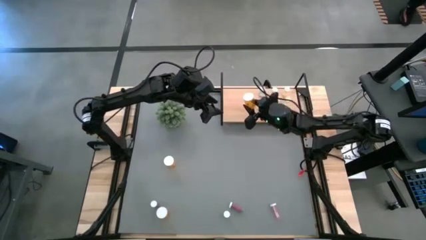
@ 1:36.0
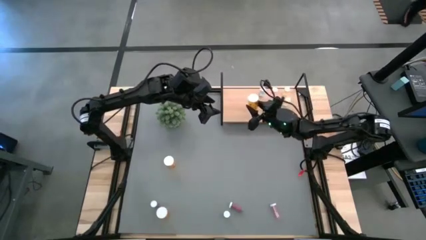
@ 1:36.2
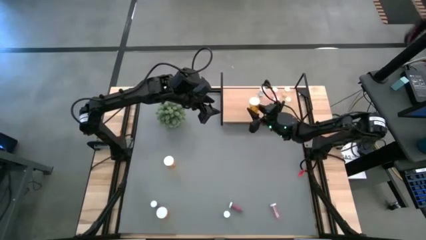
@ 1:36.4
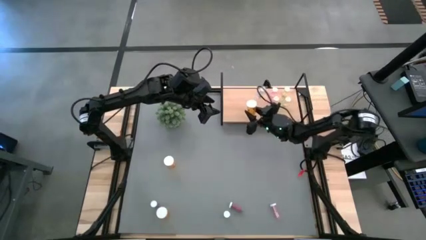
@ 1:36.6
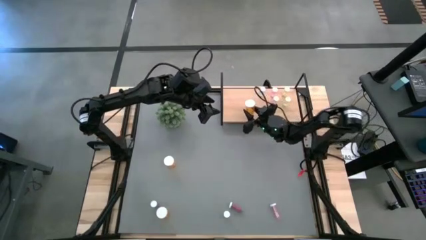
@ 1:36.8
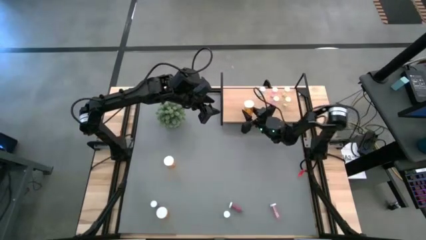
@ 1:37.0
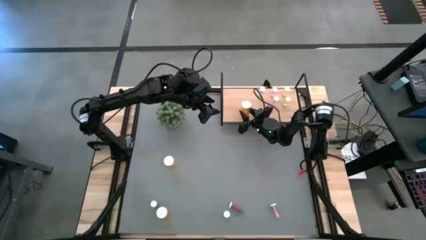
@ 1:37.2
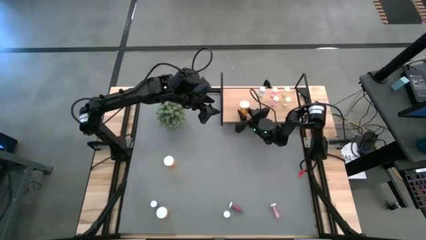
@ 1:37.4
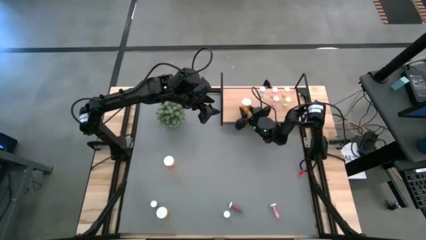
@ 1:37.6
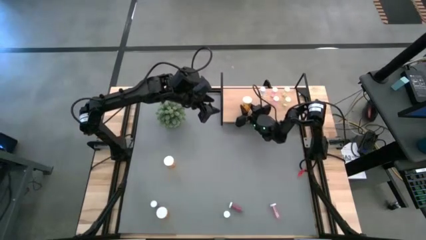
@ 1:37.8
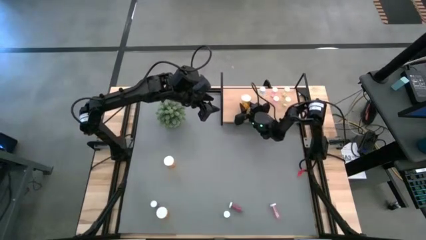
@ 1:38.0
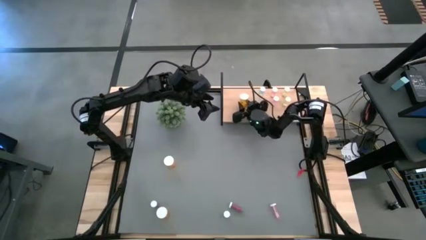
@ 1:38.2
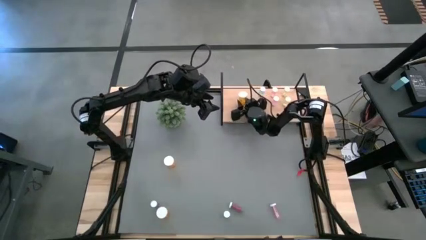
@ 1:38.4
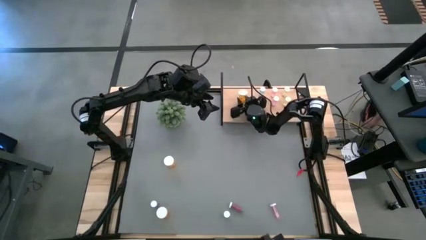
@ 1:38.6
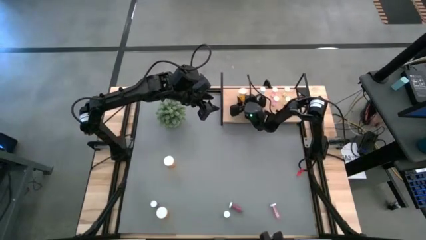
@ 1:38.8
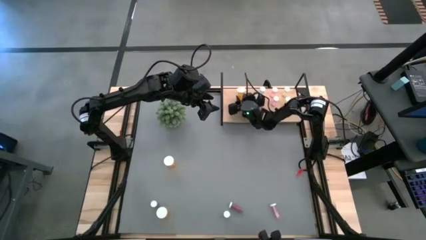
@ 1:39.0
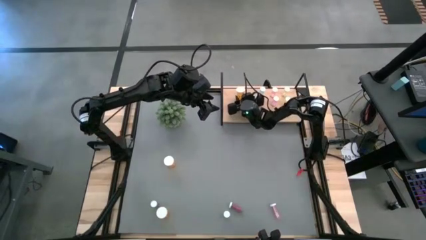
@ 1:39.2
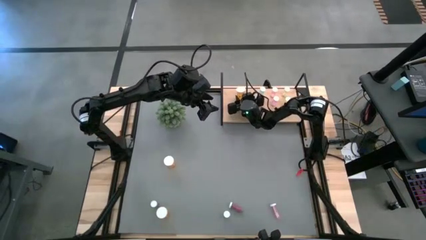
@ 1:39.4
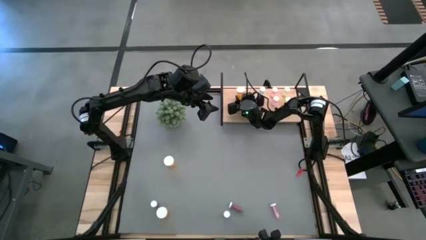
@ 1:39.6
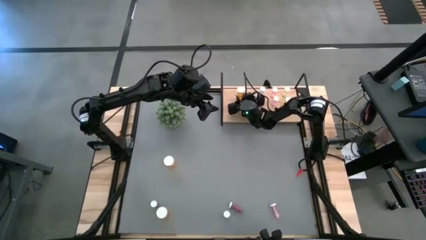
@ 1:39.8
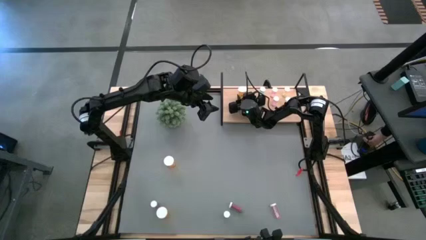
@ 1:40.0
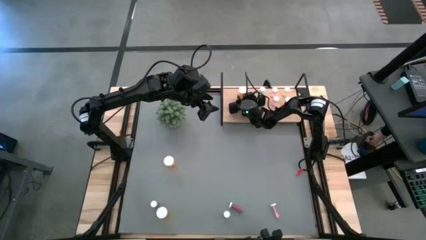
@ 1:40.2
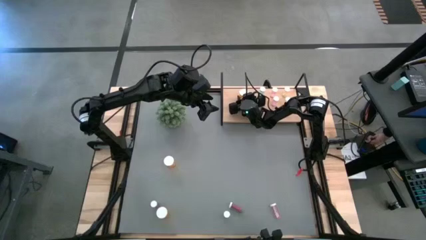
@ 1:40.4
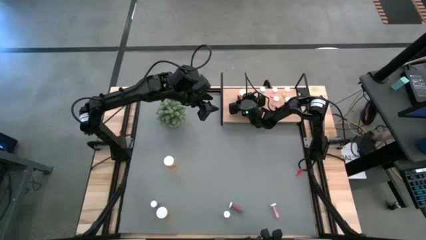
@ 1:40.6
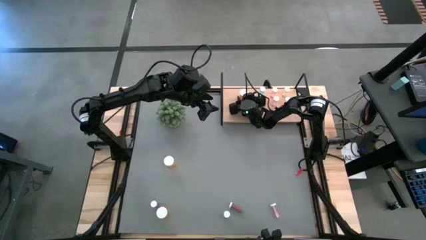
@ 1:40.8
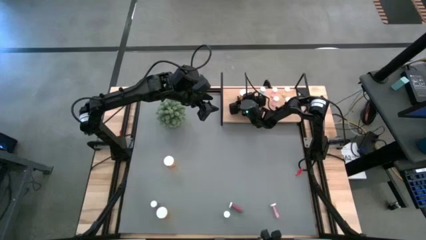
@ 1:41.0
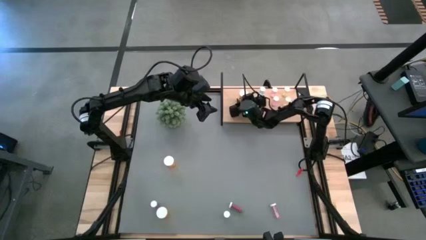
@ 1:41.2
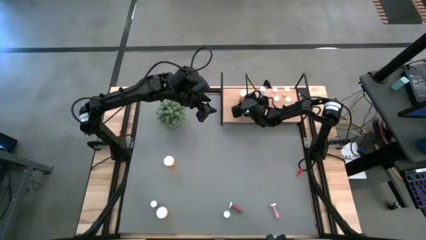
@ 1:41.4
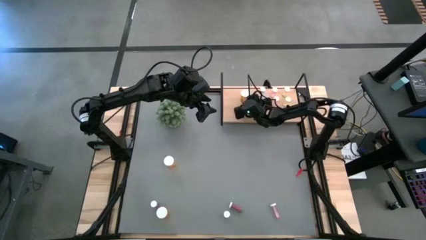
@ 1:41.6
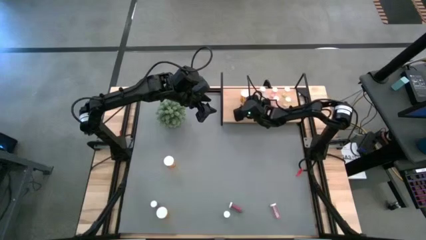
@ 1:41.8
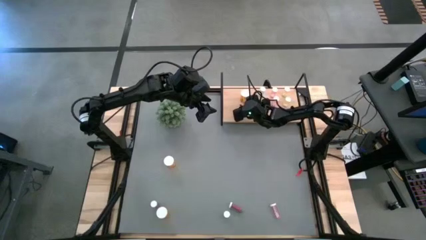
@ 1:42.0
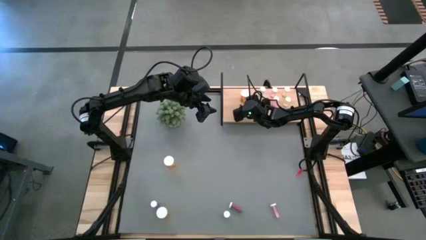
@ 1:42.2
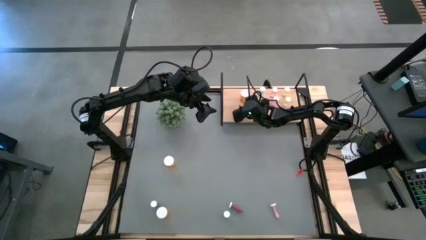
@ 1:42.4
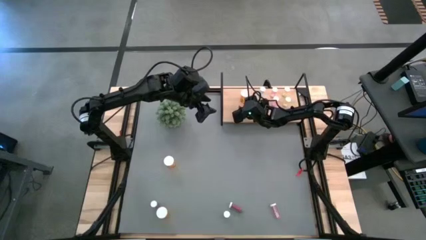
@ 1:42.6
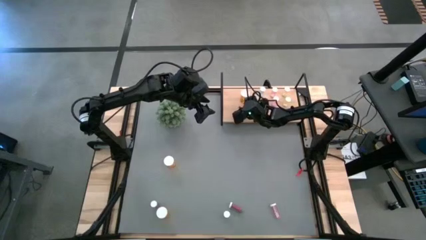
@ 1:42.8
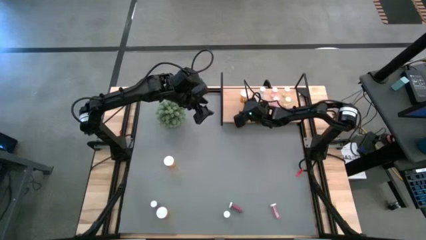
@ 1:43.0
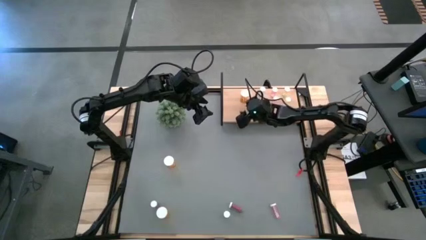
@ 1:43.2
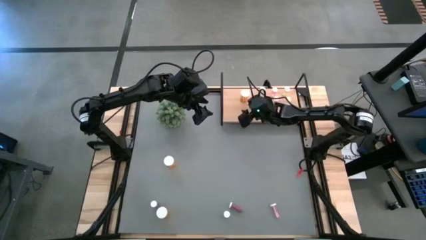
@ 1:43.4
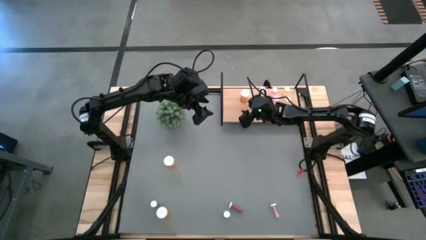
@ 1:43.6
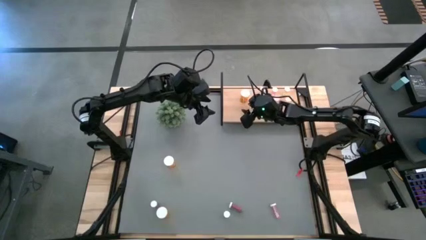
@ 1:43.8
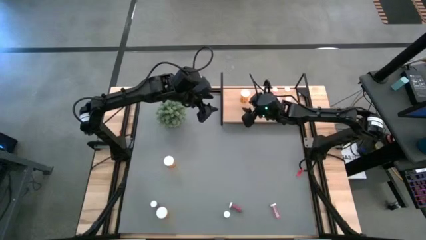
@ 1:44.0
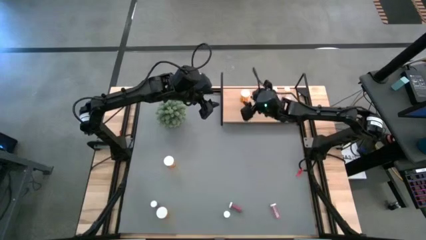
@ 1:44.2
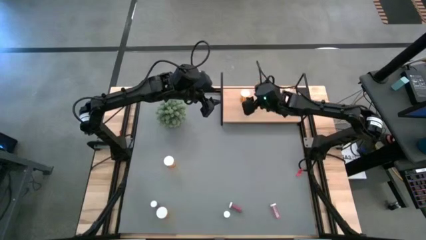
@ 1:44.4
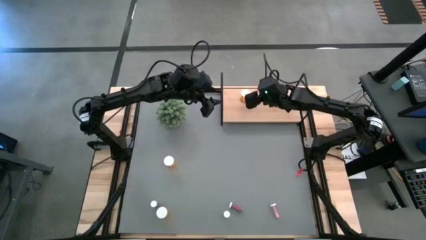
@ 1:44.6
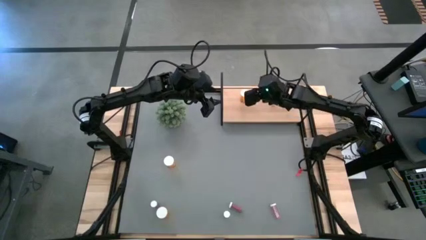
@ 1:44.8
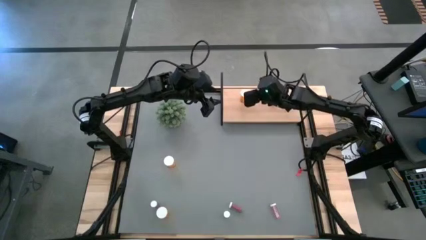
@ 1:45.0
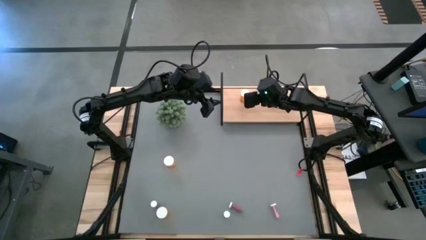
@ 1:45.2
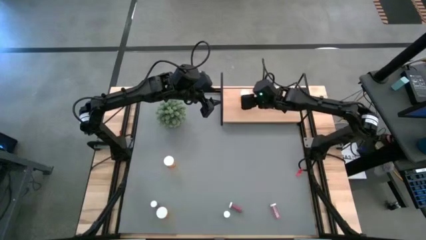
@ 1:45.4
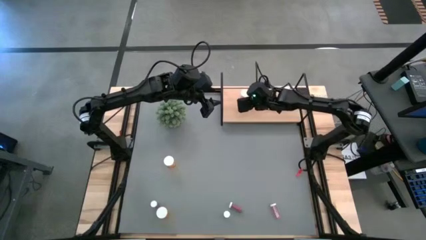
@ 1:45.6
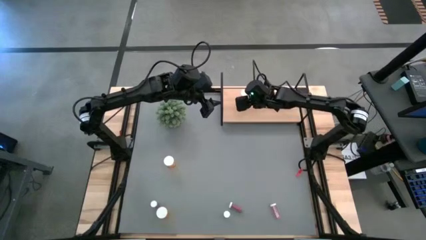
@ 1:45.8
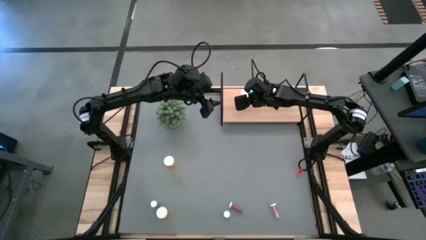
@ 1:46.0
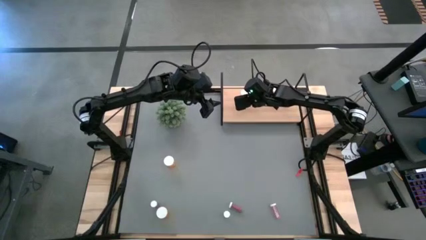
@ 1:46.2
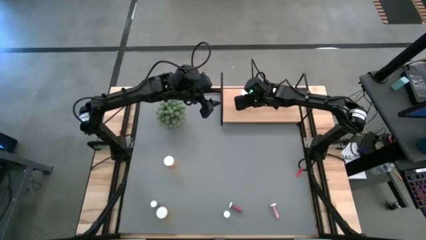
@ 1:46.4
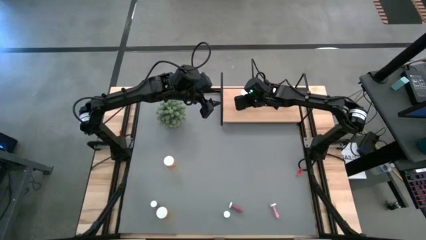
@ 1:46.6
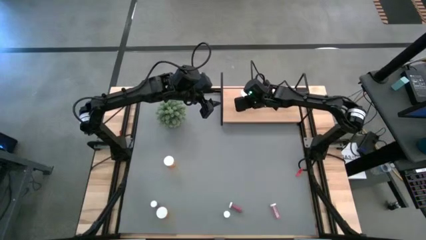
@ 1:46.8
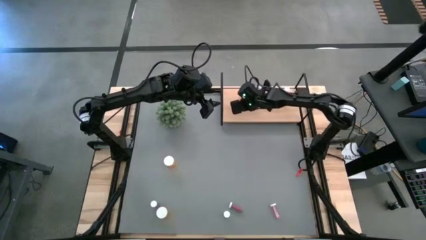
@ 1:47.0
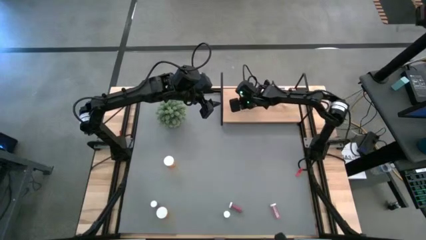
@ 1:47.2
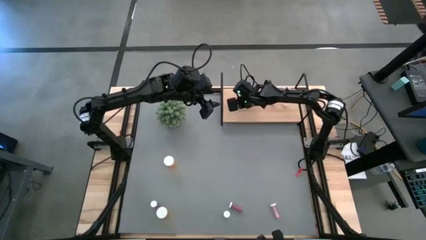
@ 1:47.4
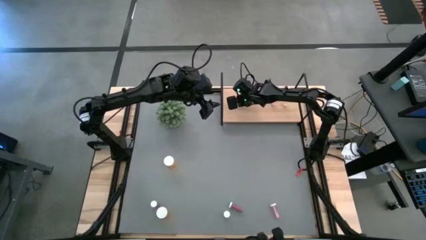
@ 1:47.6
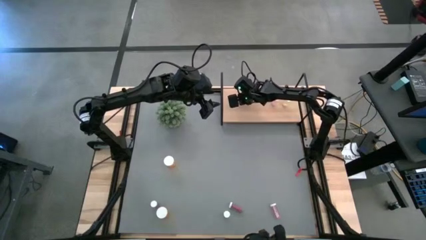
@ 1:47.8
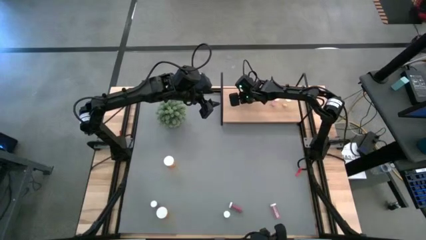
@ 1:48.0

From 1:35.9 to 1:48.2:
Task: Pick and place medicine bottles onto shelf by color
Put the top left orange pill bottle on the shelf
